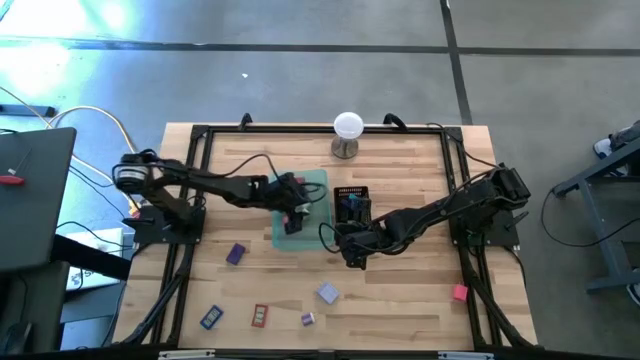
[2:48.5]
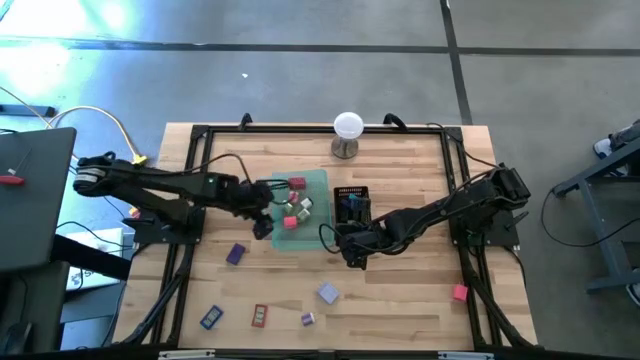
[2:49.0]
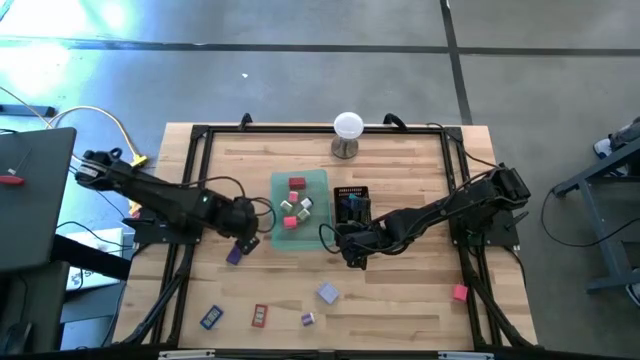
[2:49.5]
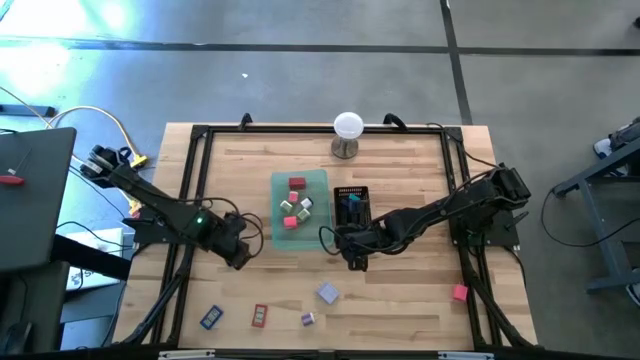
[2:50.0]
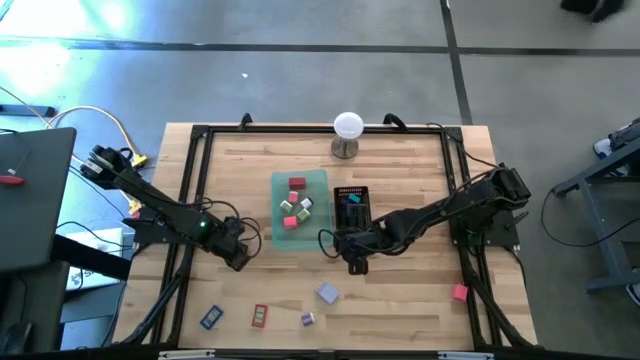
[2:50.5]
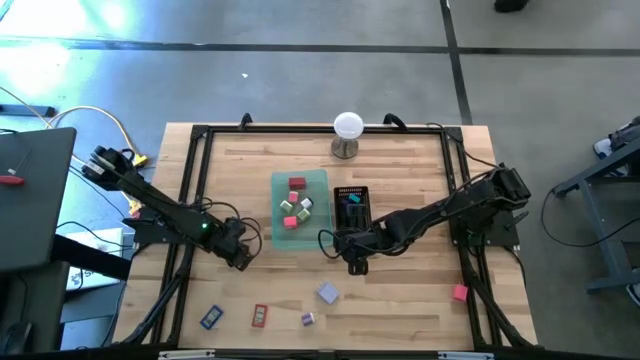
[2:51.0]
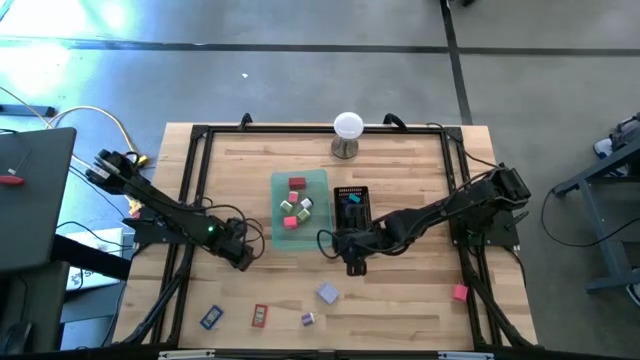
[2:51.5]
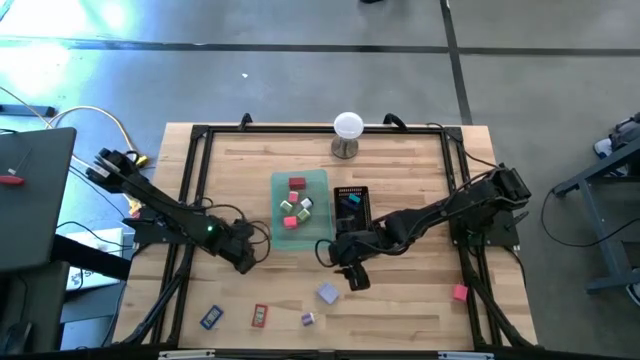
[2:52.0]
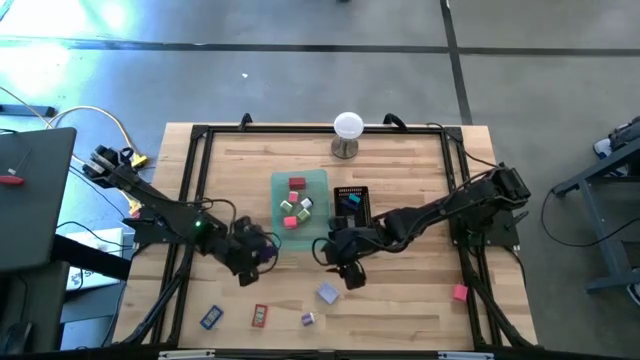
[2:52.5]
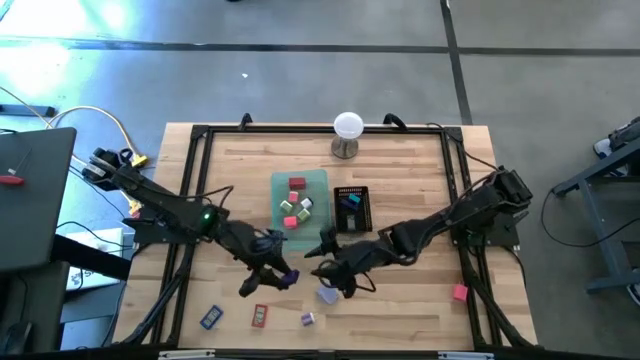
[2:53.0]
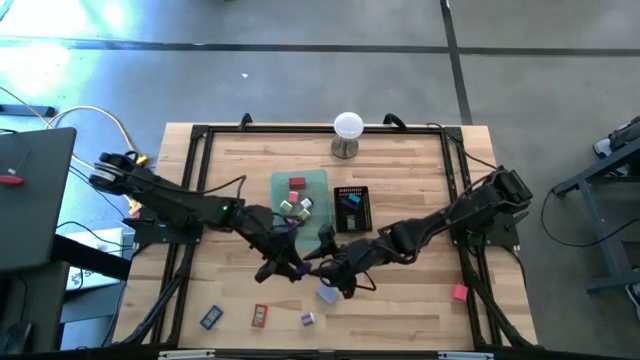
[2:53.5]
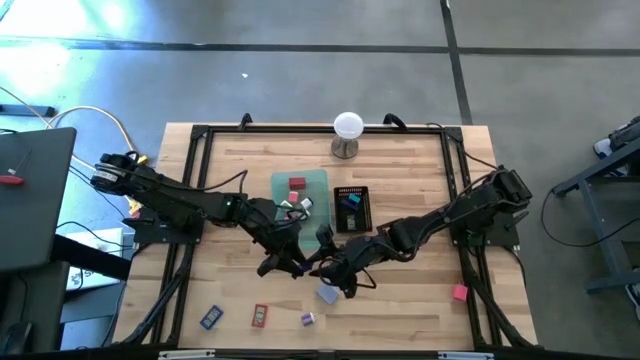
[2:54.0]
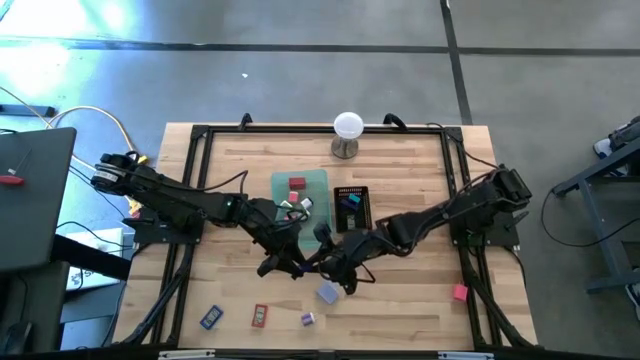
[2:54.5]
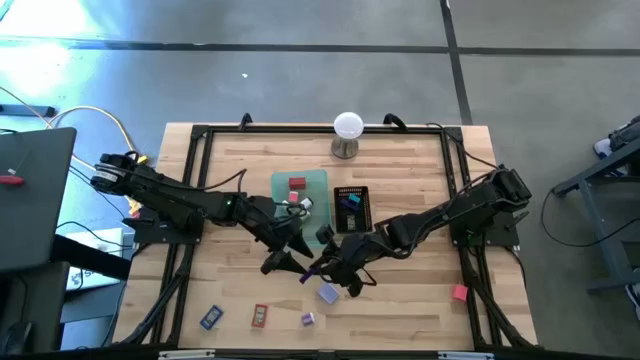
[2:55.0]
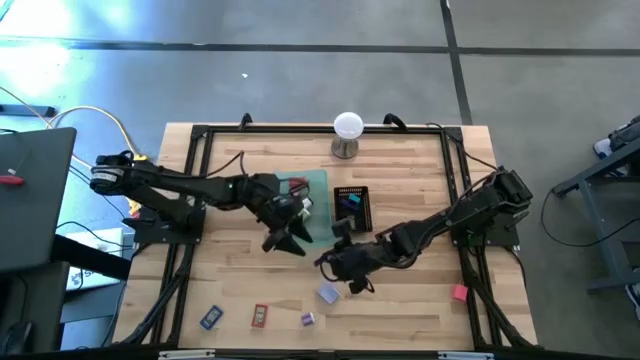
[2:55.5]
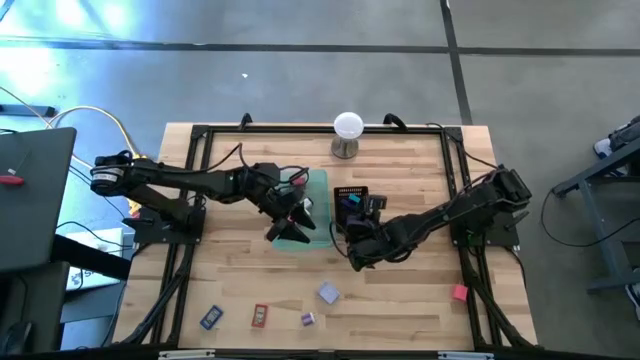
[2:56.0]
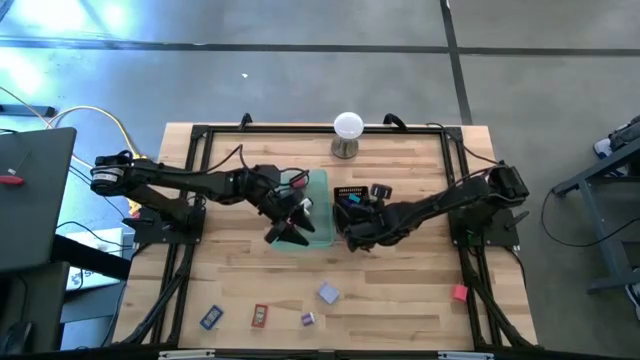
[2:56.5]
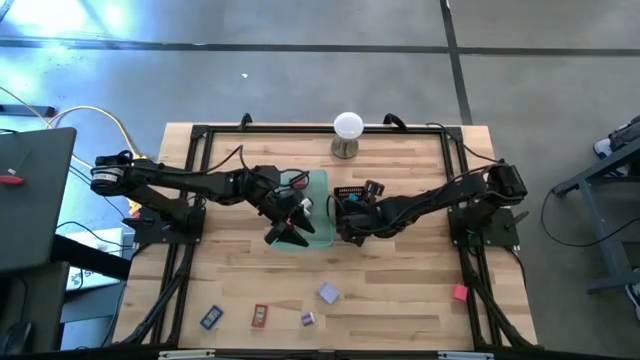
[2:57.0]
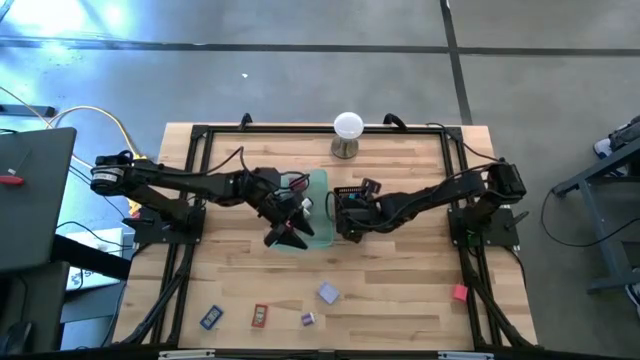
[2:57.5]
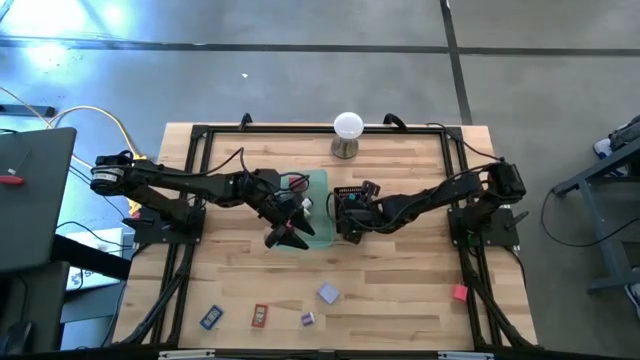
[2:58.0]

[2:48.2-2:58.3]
Task: Pick & Place Office items
Put the violet digital clock into the black bin

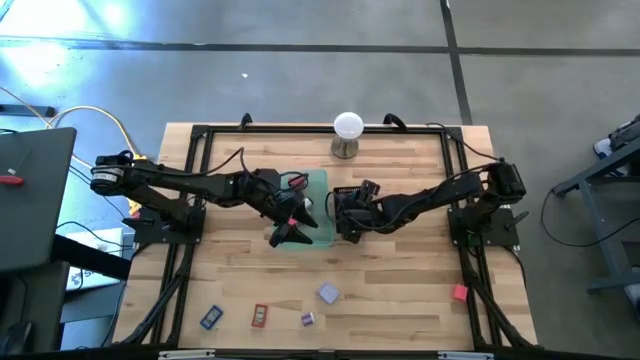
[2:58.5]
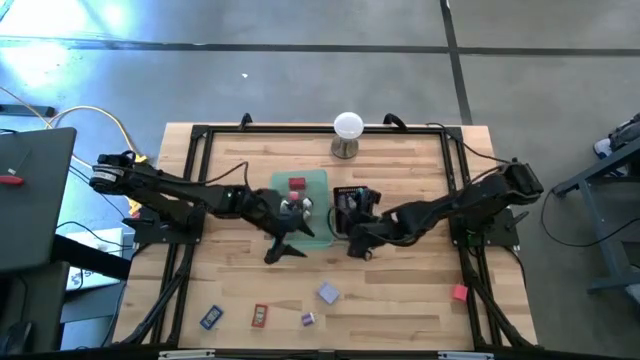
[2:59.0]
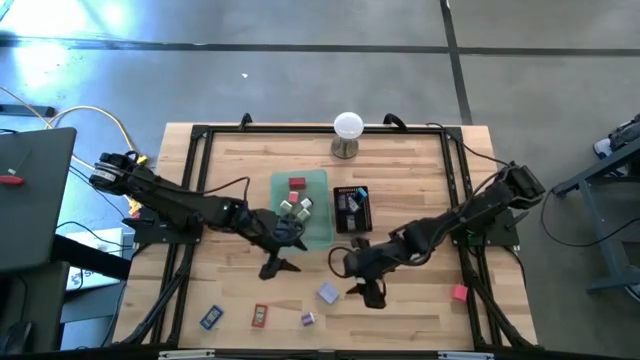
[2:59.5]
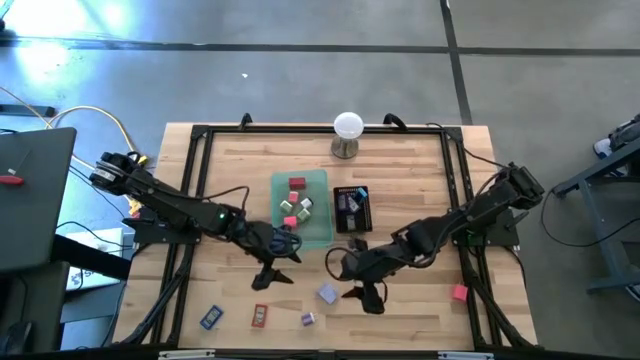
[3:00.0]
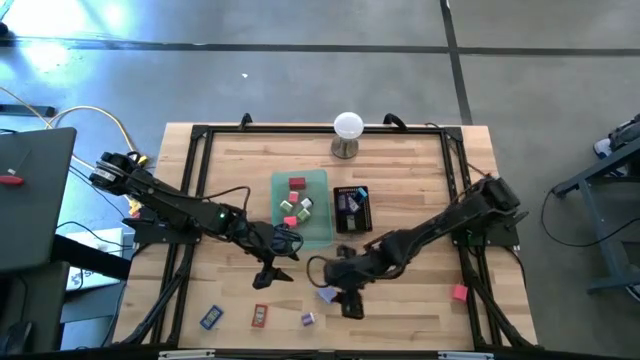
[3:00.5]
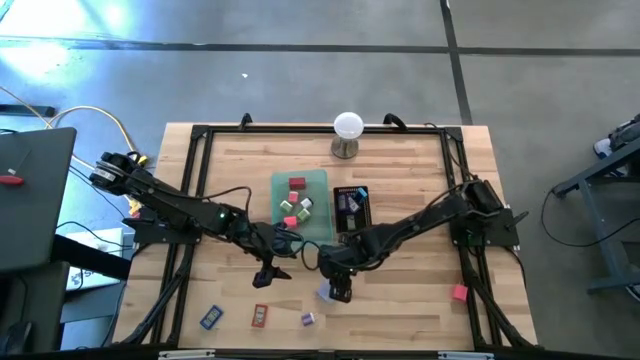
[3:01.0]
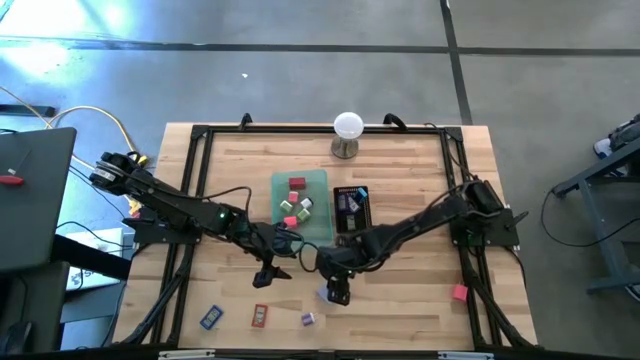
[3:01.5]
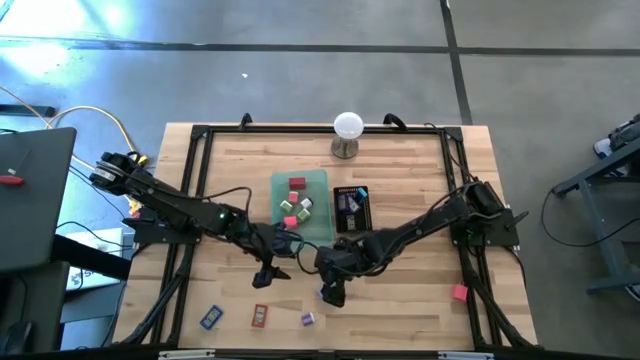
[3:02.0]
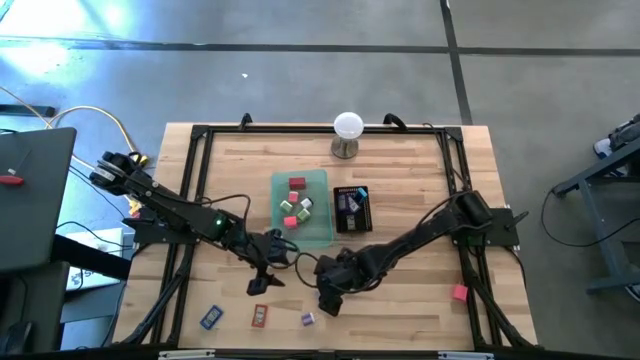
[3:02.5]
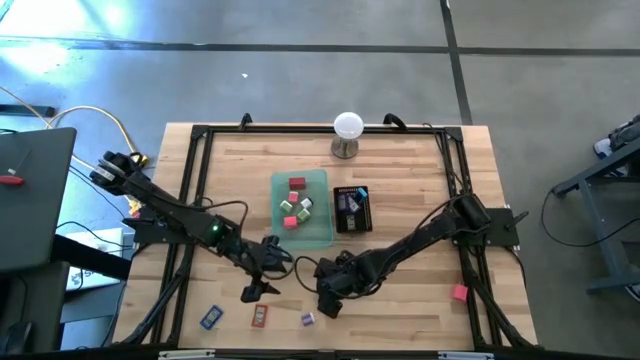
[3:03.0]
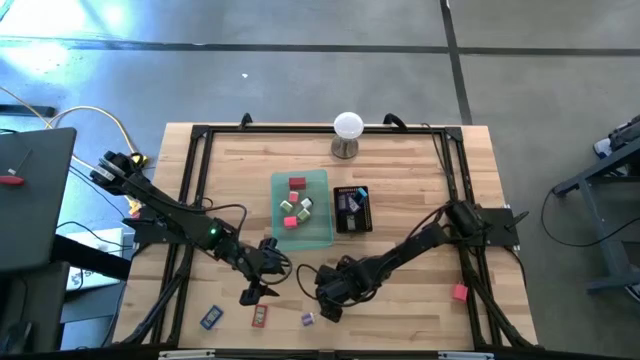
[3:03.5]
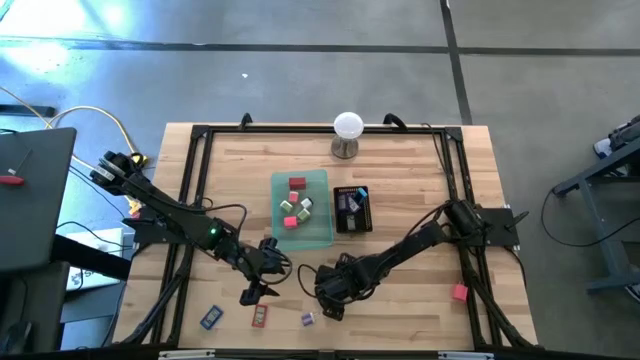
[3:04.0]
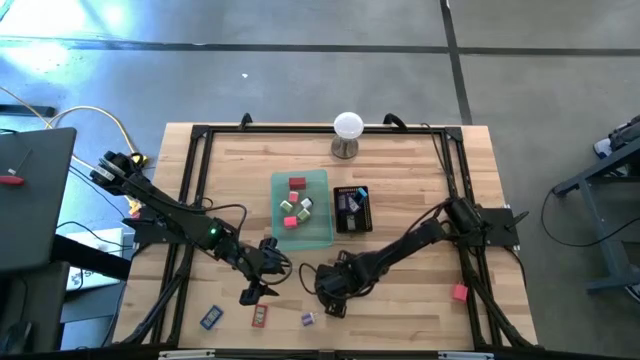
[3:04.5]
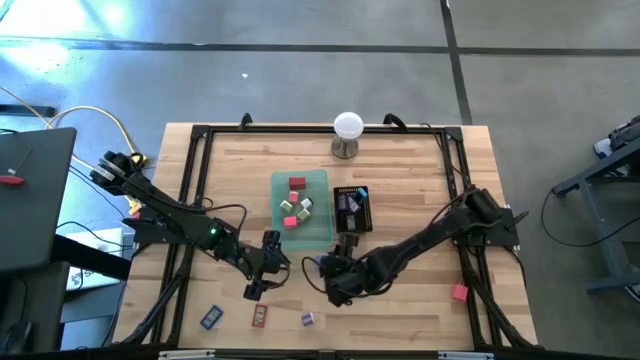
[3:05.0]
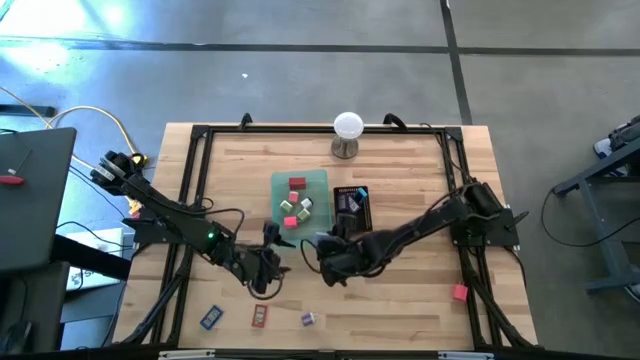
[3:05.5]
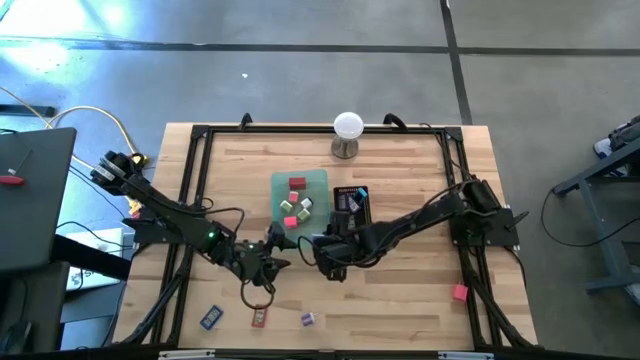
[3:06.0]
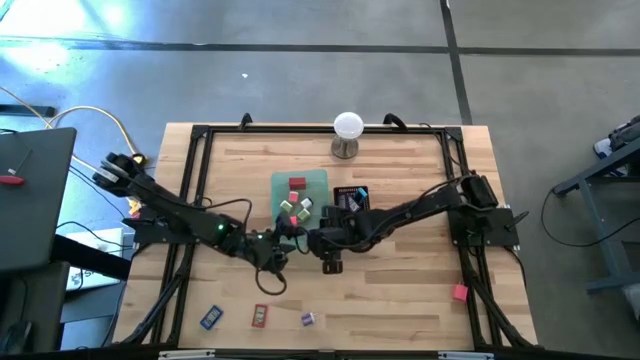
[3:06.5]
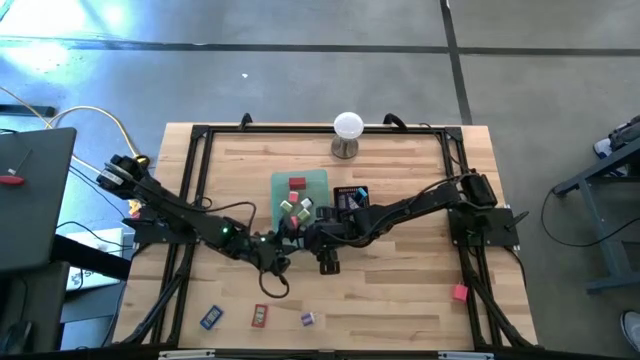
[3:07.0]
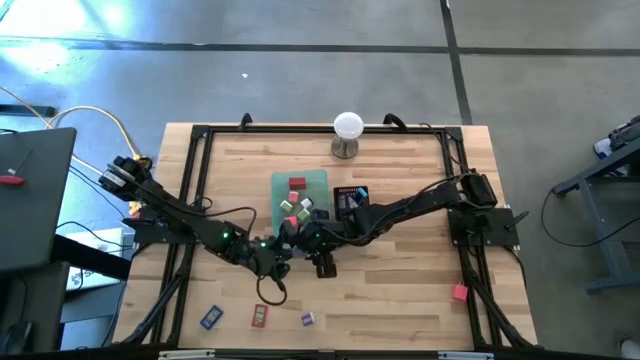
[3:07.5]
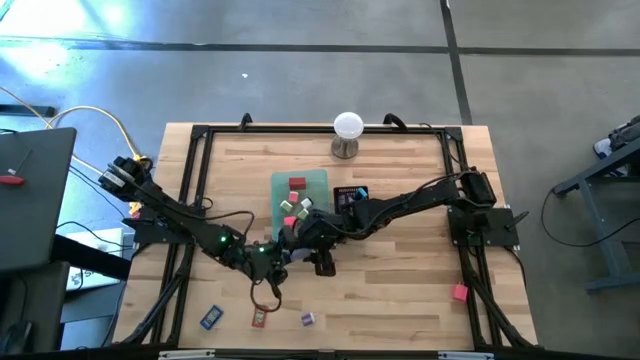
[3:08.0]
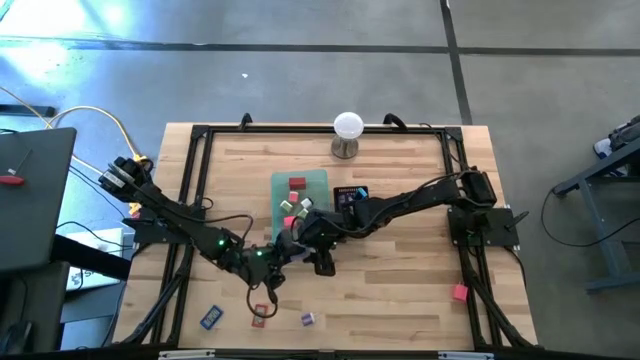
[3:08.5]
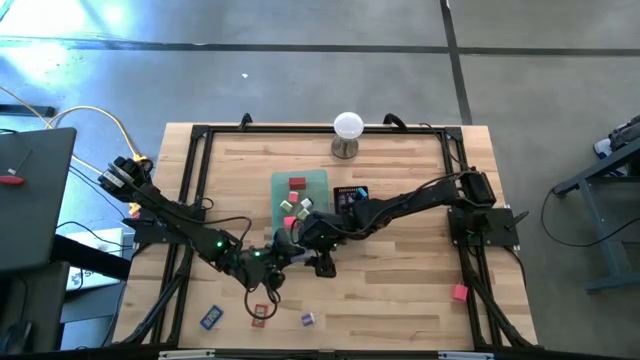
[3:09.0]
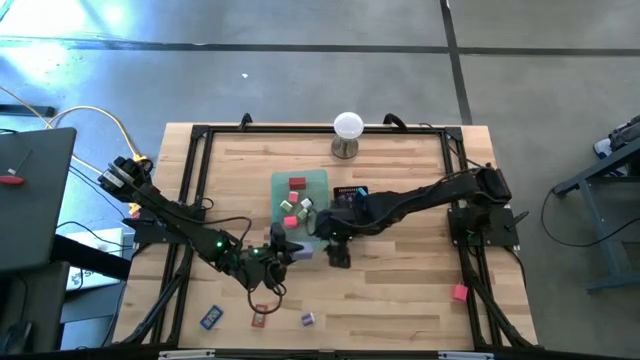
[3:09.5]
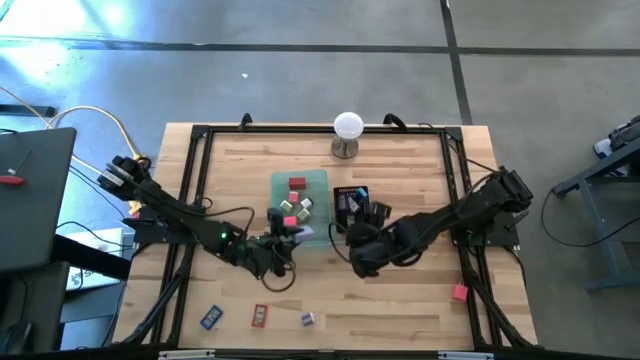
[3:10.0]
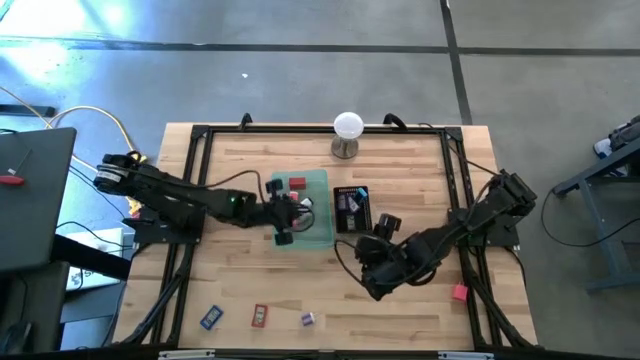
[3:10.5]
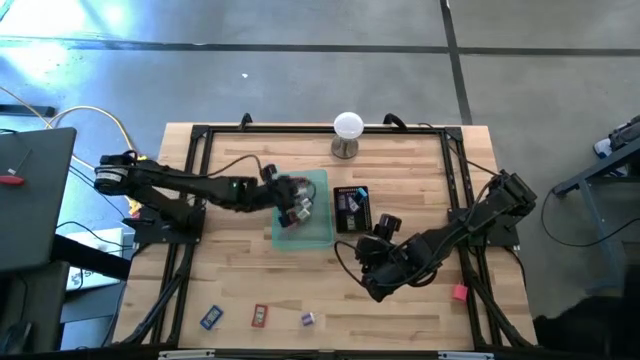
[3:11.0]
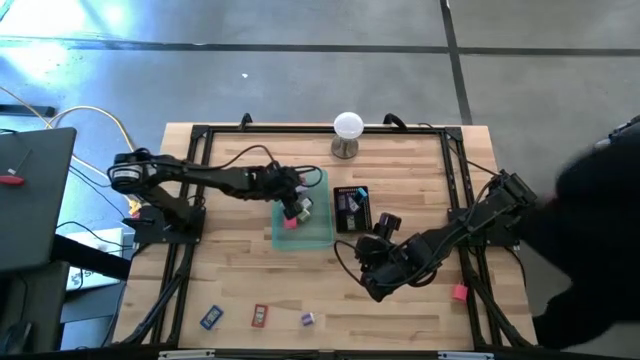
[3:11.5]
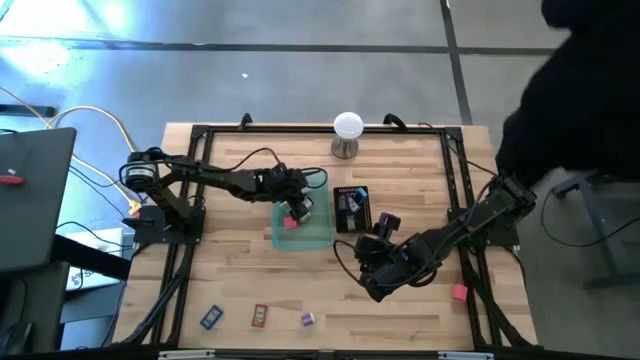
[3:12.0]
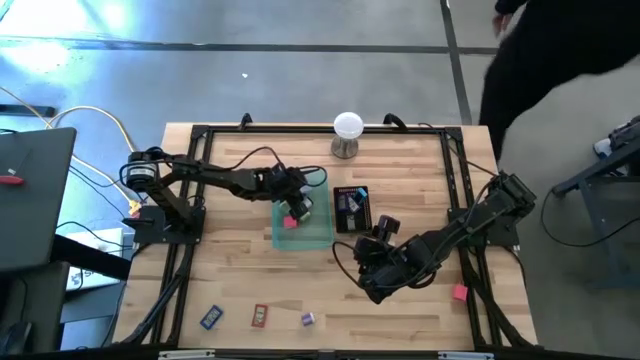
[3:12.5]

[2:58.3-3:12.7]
Put the light blue charger adapter into the blue bin
